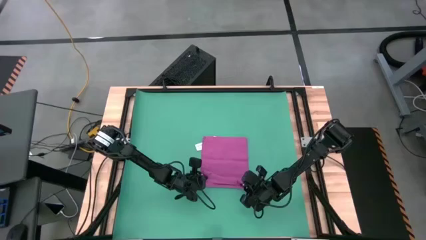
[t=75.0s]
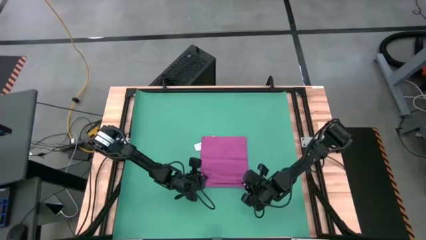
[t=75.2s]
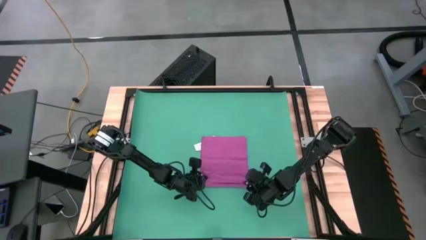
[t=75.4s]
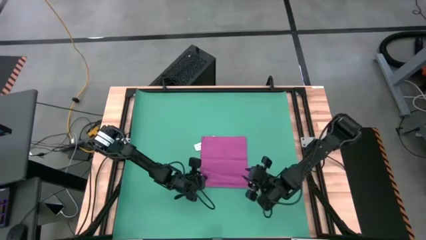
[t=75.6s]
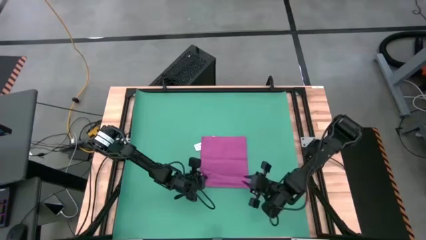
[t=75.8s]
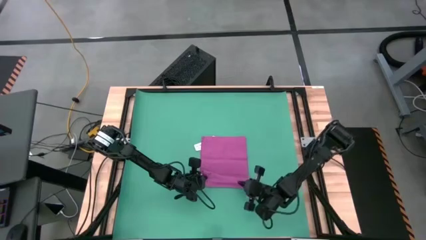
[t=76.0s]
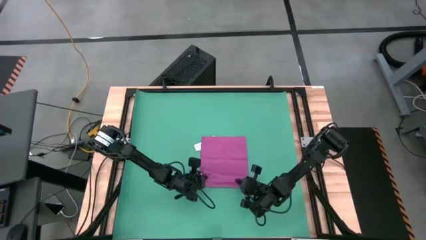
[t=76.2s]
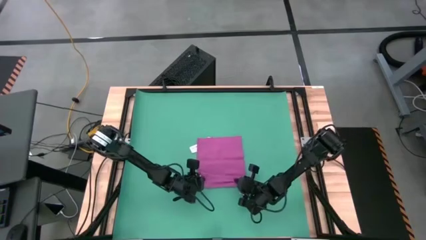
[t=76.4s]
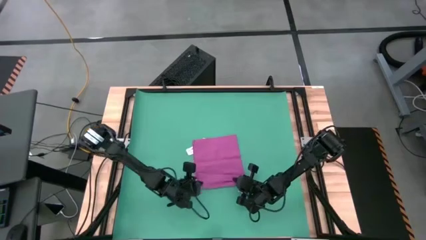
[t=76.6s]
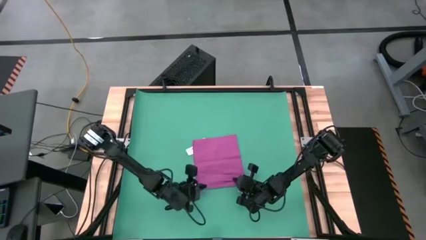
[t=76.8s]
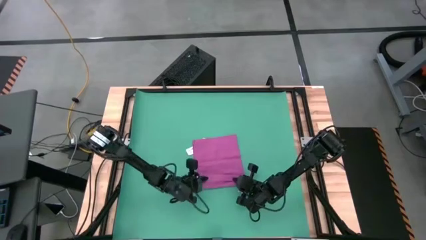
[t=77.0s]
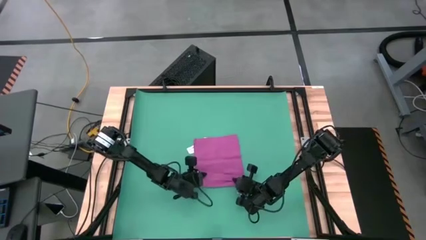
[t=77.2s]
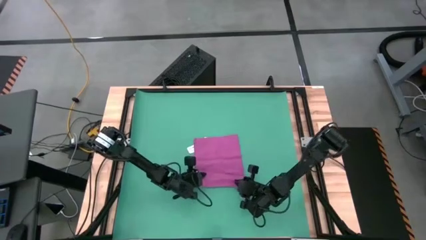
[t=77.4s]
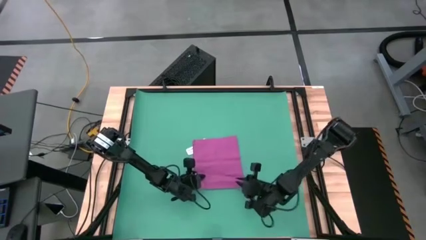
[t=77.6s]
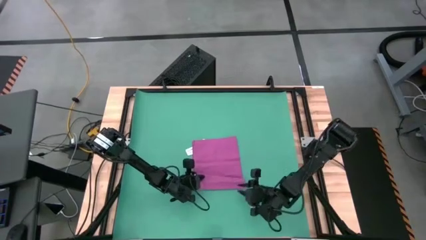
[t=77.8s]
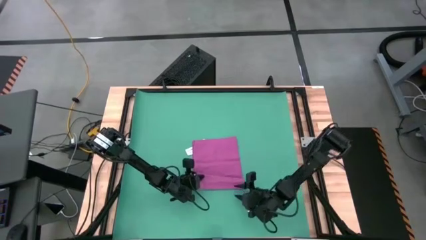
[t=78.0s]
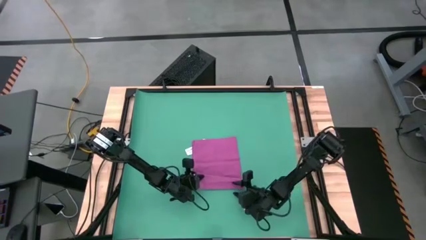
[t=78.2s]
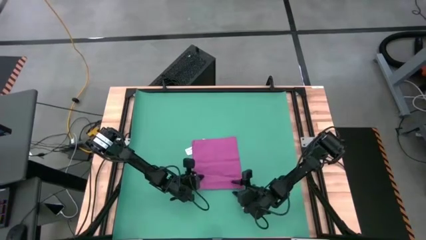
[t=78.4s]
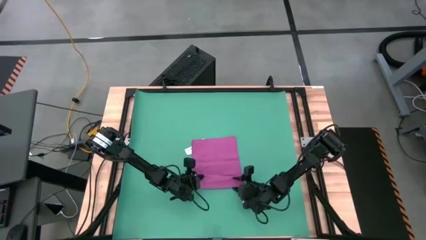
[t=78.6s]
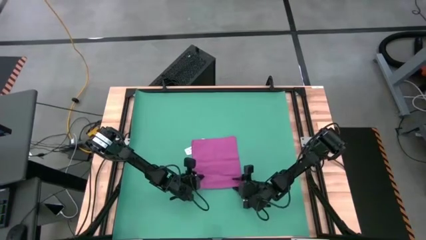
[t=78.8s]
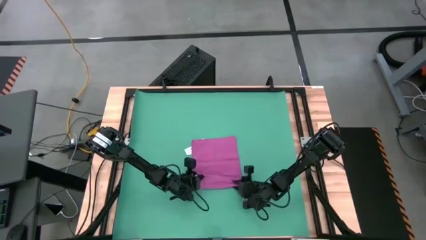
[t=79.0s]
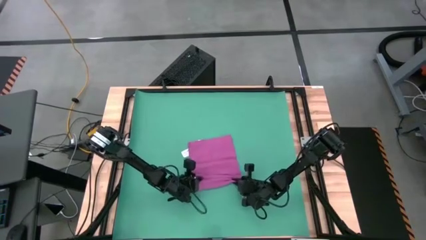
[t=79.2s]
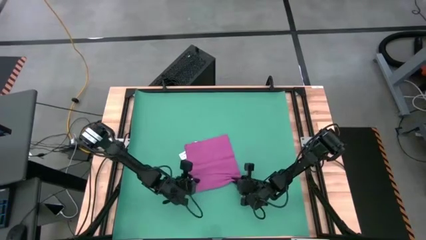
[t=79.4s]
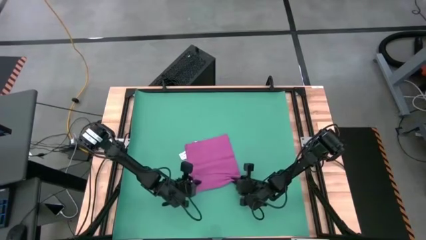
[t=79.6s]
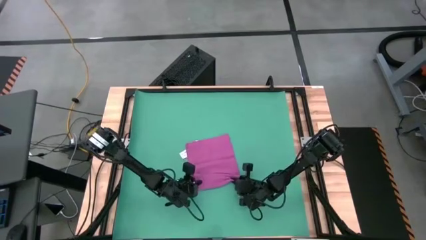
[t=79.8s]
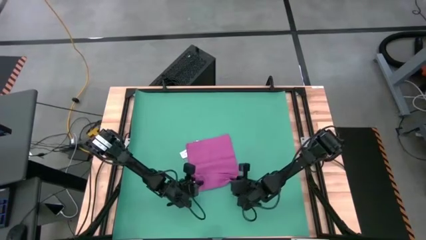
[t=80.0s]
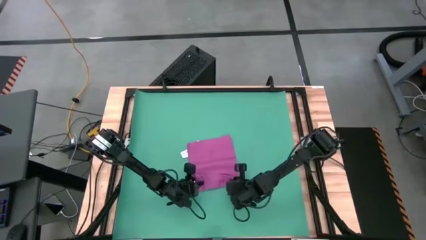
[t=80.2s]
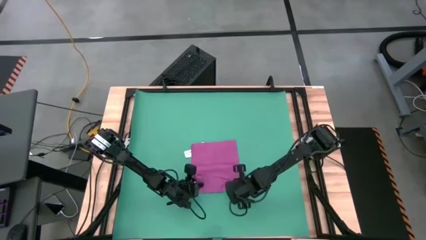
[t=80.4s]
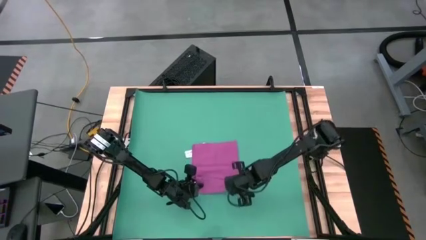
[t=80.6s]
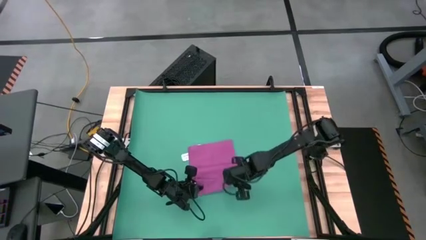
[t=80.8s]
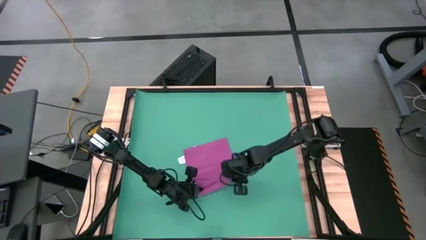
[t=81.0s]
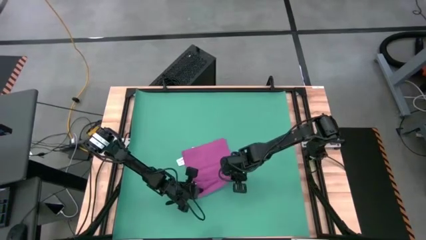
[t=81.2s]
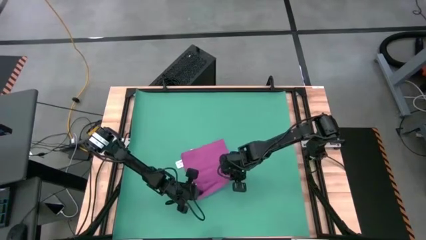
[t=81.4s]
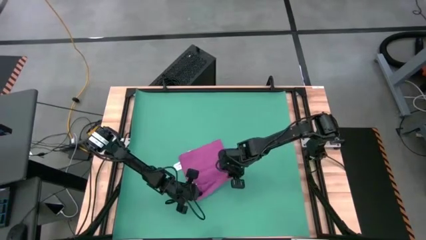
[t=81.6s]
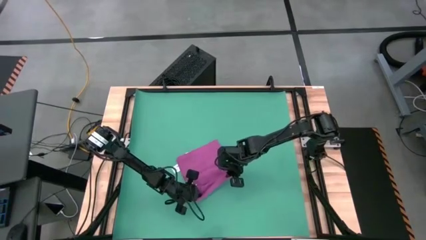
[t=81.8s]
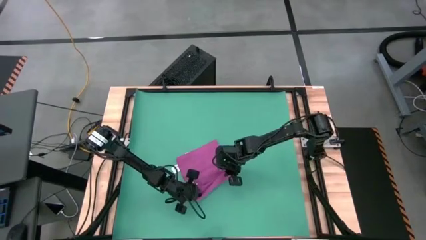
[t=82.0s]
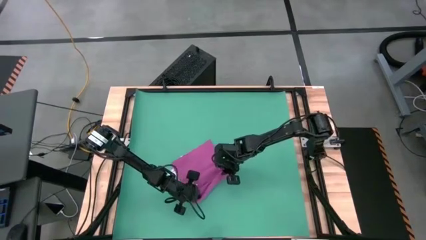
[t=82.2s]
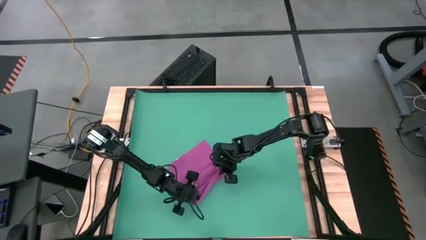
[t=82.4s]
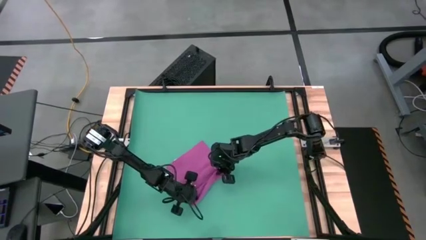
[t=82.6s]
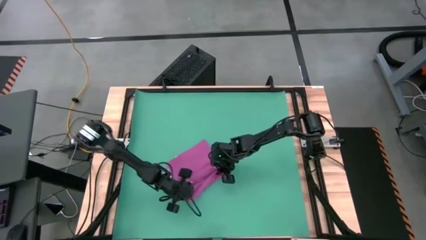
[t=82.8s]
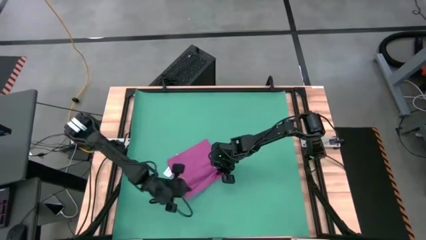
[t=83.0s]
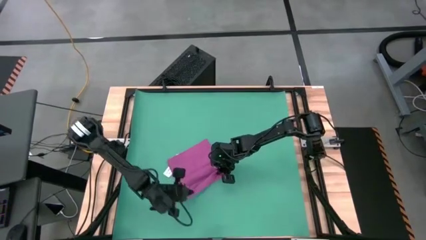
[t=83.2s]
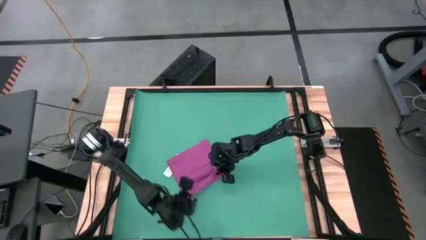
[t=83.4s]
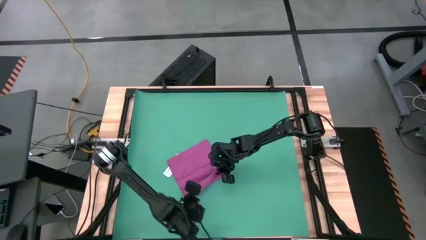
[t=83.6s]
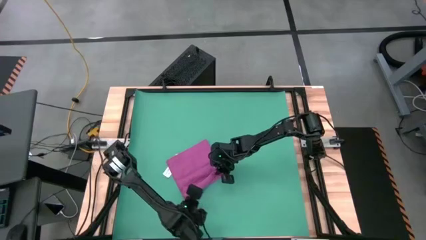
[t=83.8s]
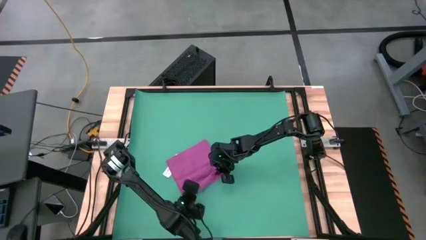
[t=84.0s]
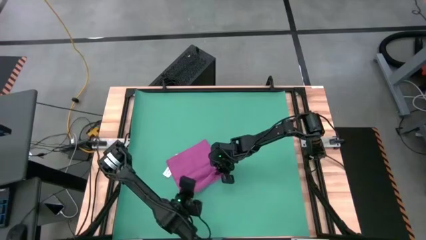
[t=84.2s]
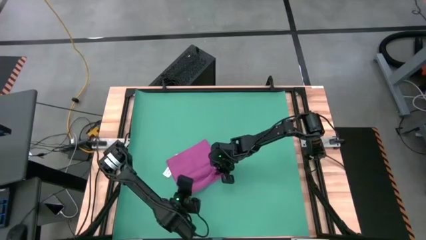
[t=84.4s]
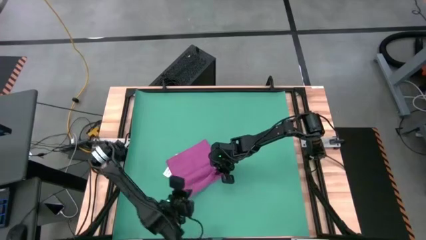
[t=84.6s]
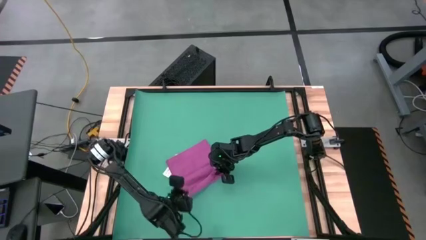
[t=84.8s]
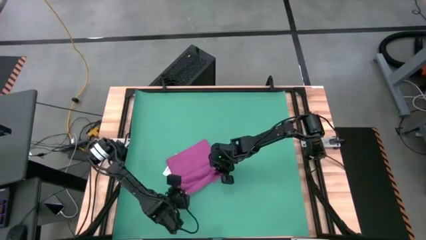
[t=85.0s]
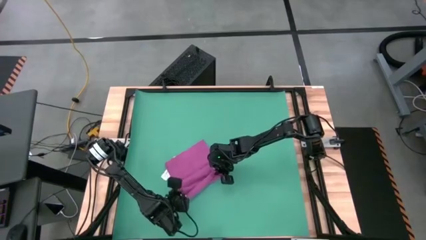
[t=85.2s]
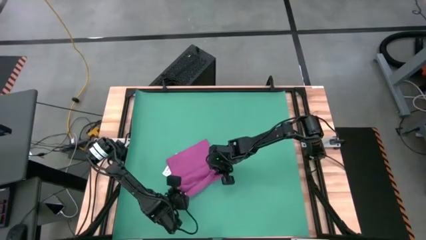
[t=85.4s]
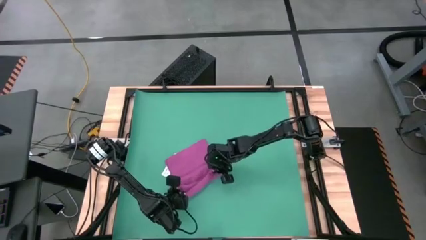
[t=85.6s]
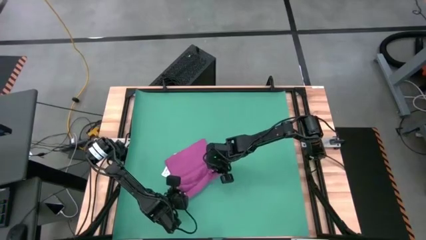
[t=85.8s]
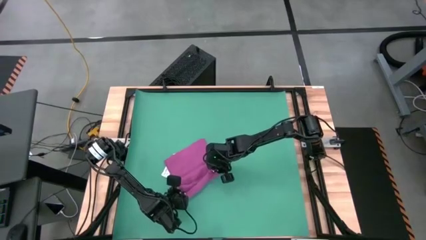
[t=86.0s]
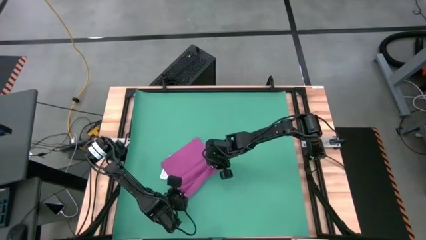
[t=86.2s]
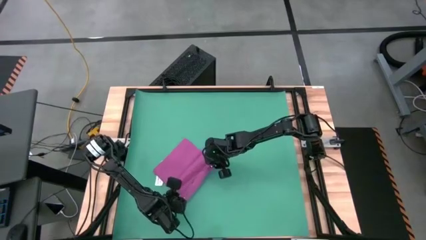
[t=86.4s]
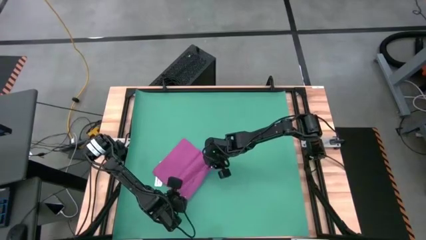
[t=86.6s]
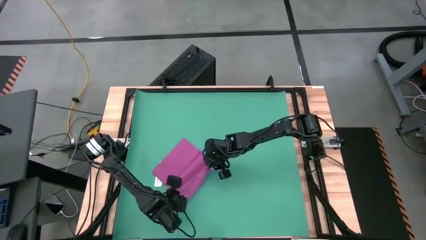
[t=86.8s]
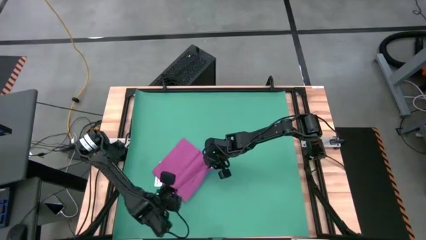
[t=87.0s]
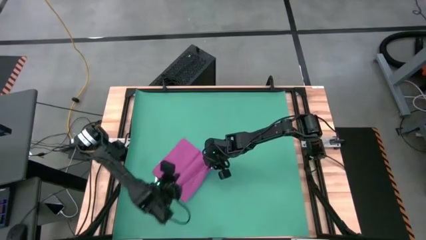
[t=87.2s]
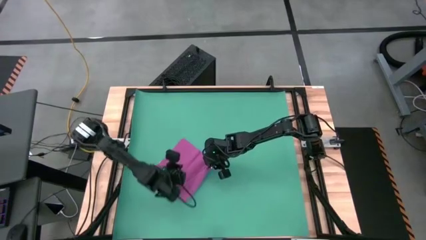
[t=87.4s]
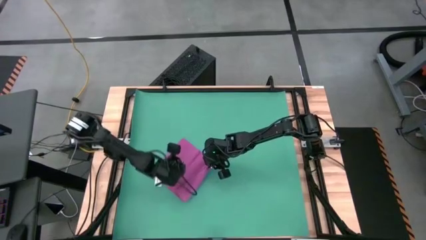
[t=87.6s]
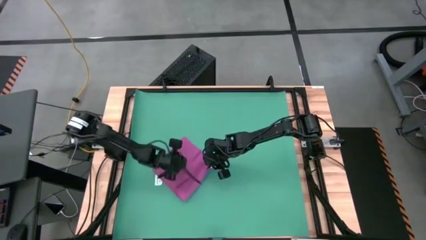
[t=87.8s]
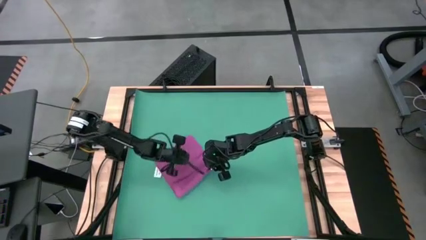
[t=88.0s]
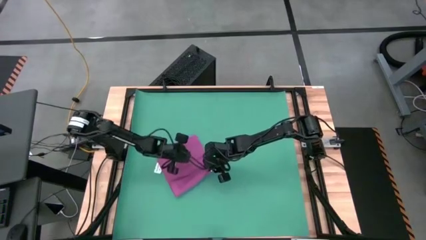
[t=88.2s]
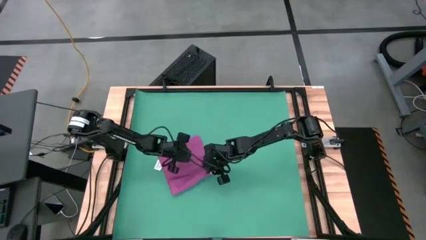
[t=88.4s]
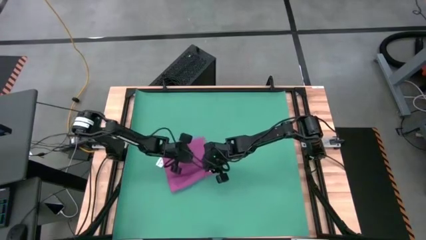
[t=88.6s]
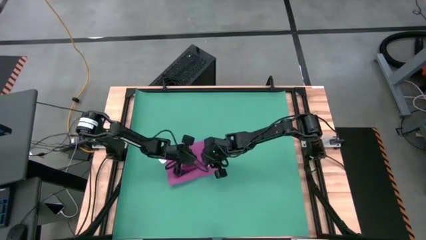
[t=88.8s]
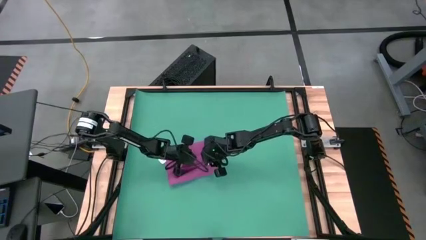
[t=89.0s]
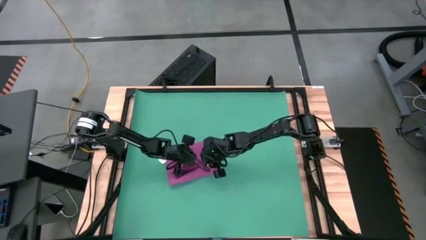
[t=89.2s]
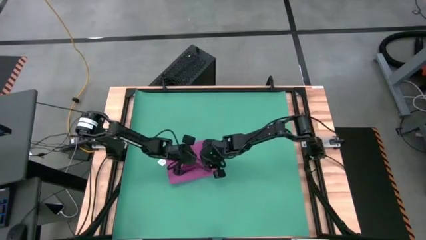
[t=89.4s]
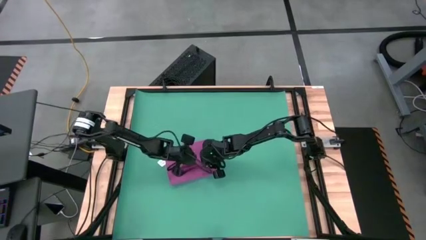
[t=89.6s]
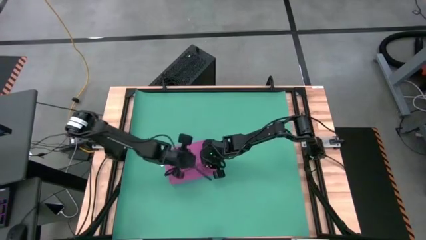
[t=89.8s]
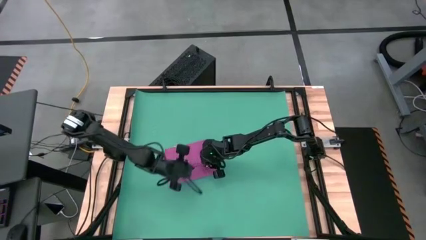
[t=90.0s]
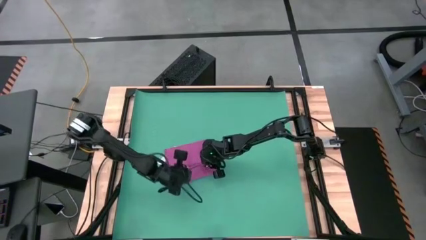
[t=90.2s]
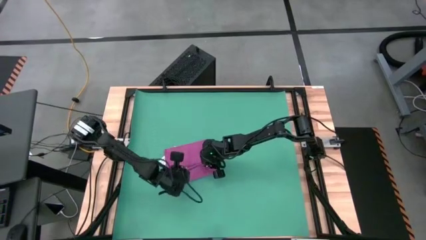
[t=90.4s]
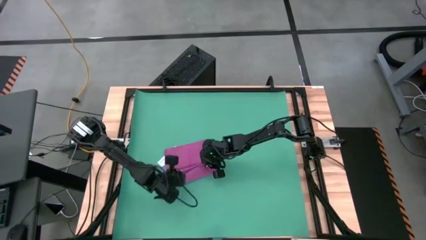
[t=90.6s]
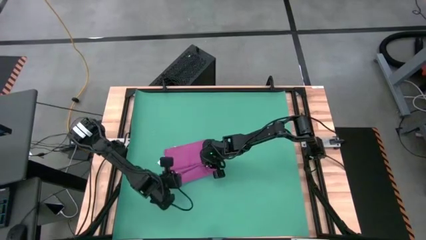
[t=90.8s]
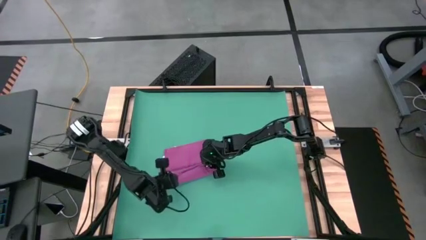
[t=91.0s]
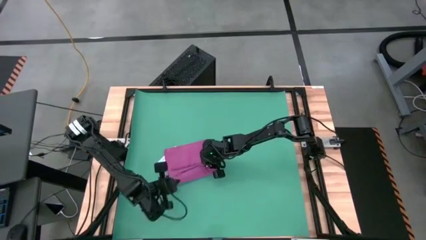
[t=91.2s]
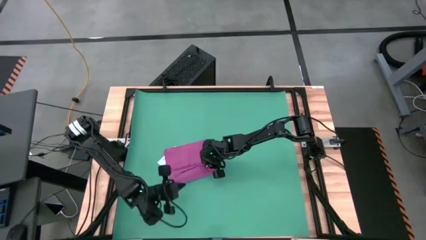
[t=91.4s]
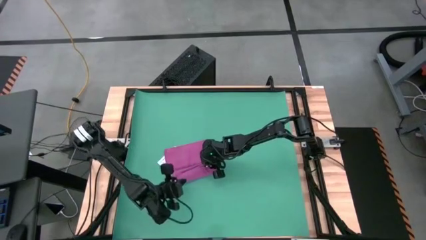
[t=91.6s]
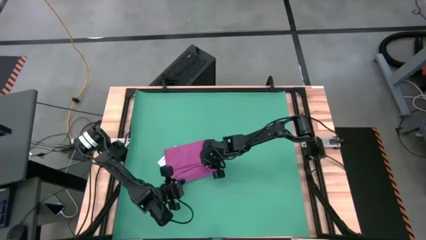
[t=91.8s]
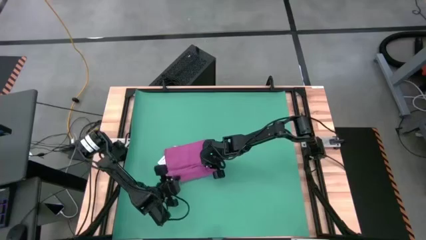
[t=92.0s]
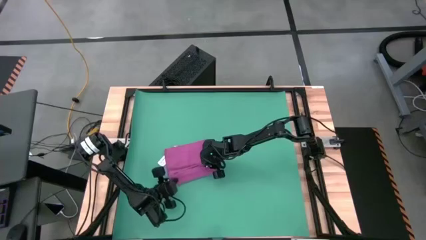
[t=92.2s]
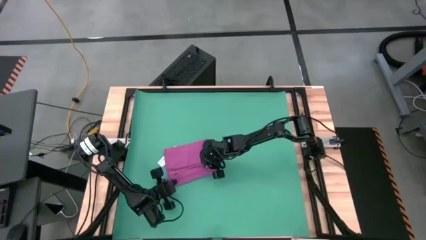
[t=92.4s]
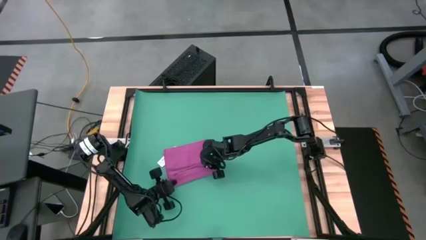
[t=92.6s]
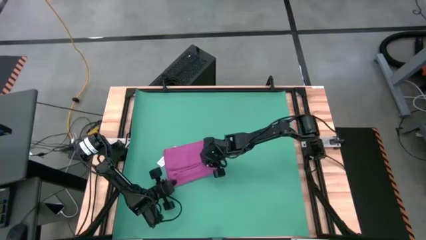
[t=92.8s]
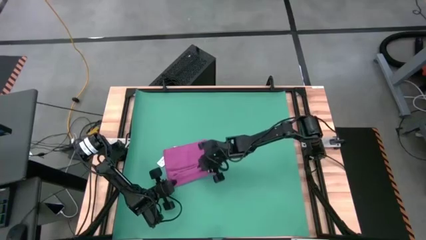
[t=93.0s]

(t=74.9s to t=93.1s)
Task: Roll towel
Roll the pink towel
